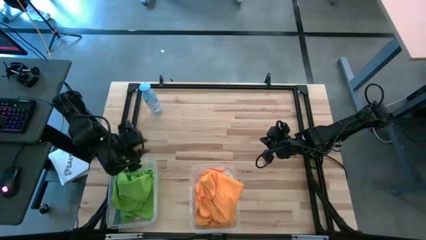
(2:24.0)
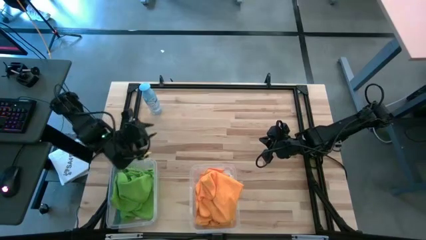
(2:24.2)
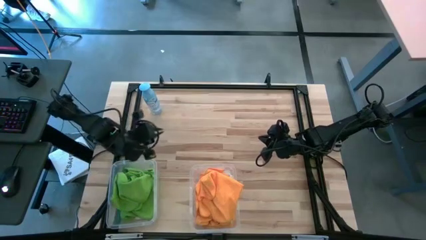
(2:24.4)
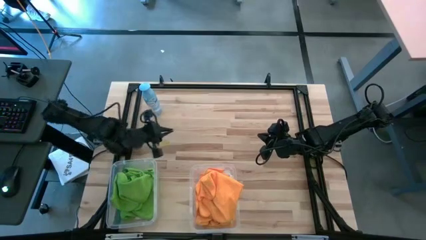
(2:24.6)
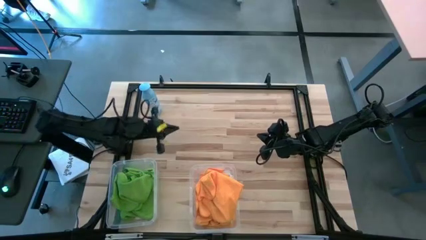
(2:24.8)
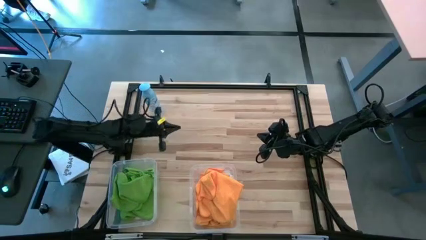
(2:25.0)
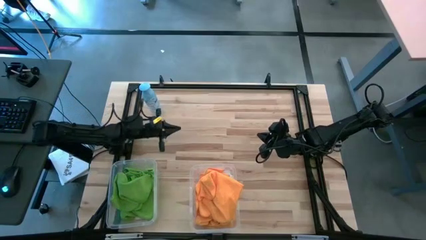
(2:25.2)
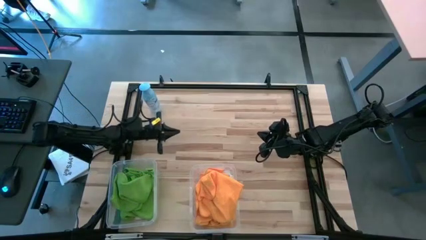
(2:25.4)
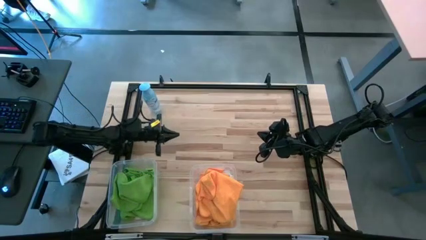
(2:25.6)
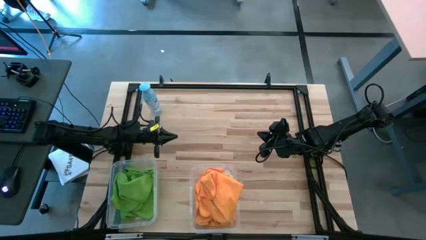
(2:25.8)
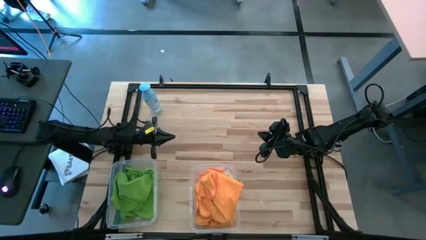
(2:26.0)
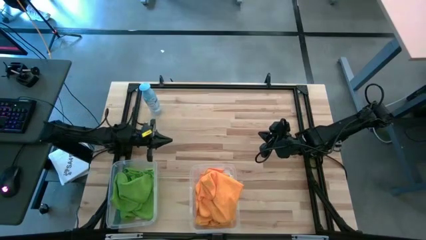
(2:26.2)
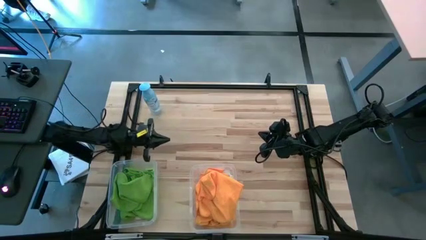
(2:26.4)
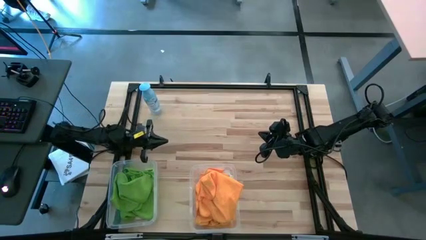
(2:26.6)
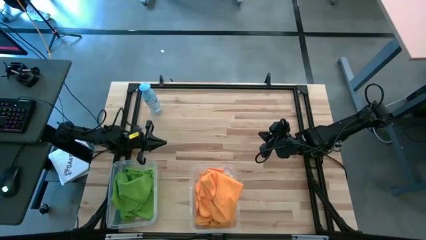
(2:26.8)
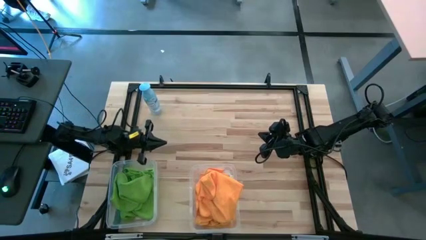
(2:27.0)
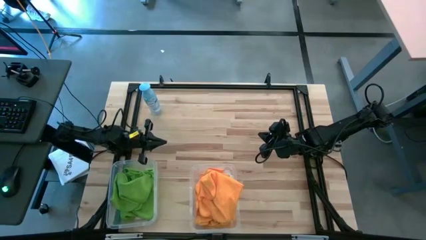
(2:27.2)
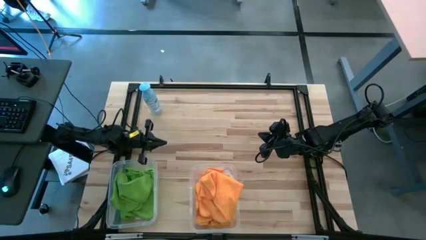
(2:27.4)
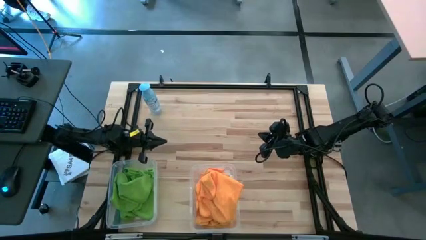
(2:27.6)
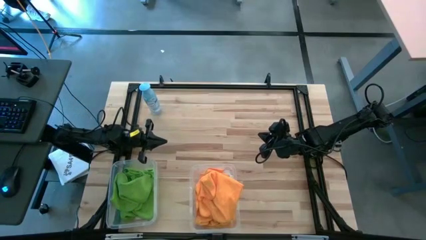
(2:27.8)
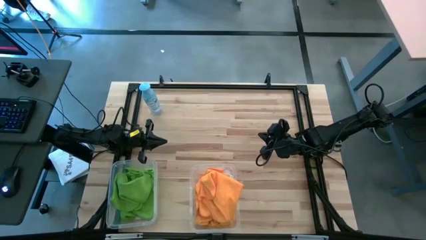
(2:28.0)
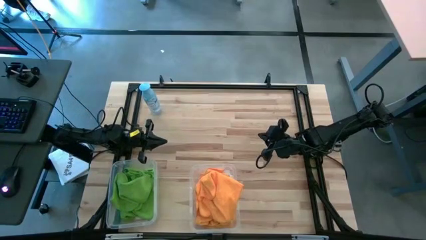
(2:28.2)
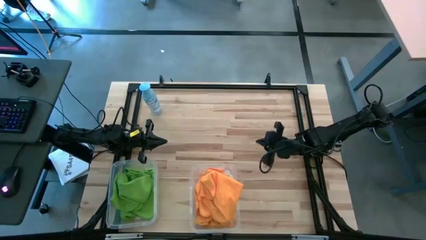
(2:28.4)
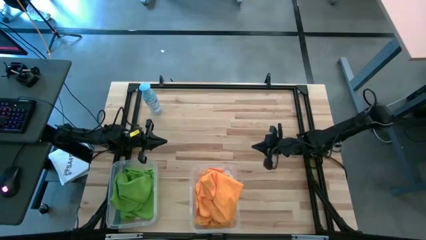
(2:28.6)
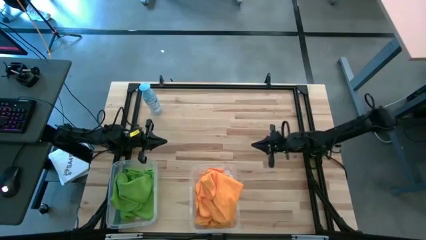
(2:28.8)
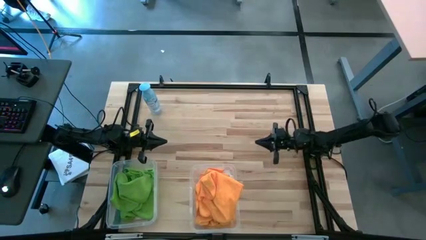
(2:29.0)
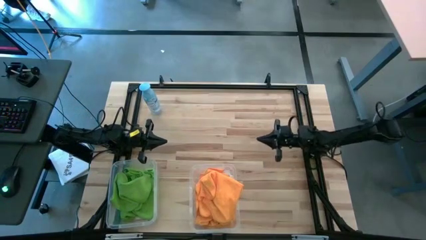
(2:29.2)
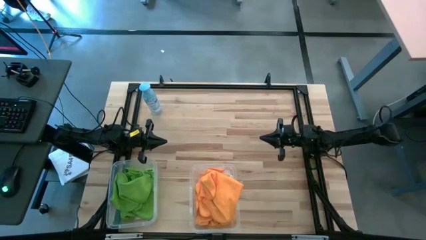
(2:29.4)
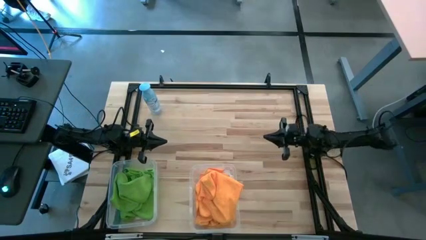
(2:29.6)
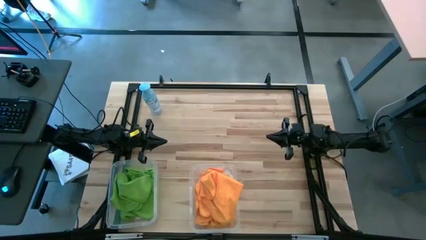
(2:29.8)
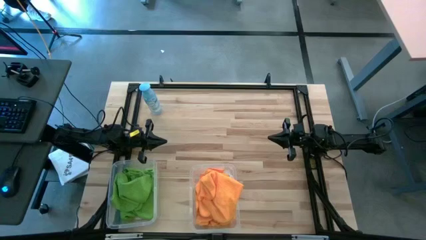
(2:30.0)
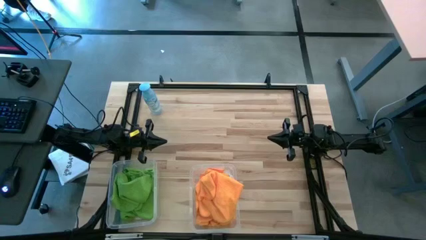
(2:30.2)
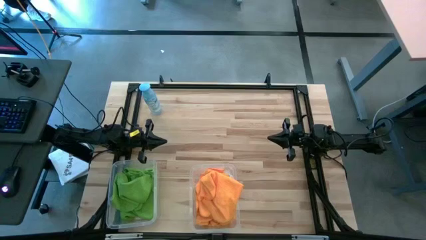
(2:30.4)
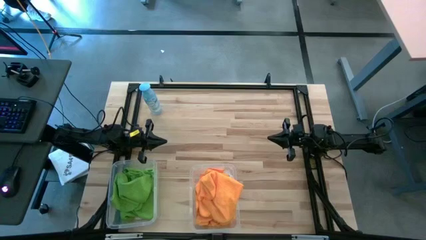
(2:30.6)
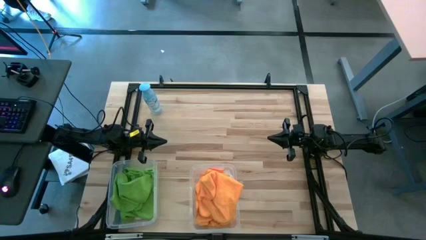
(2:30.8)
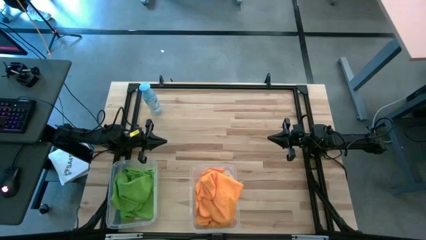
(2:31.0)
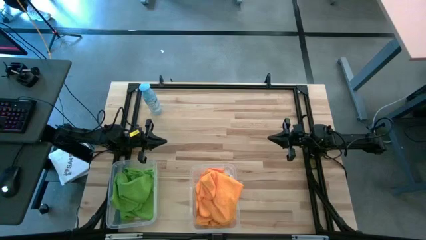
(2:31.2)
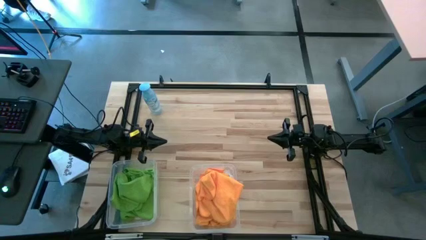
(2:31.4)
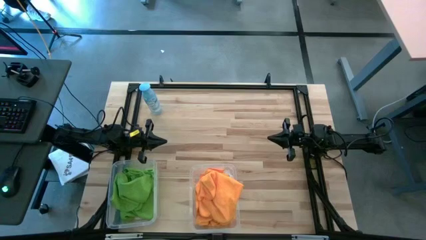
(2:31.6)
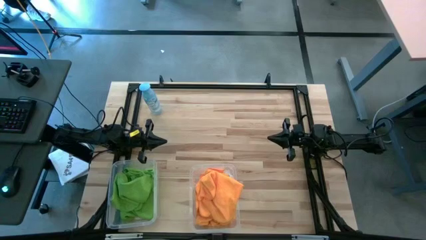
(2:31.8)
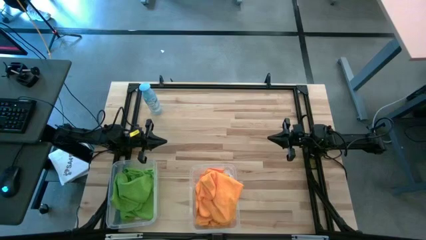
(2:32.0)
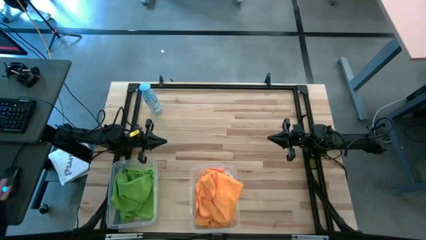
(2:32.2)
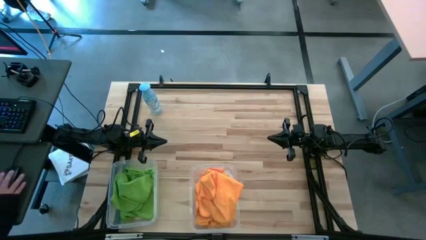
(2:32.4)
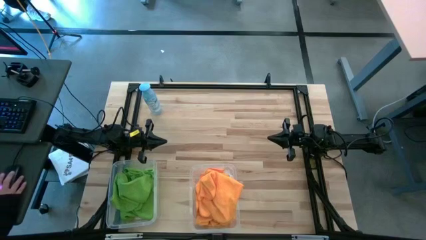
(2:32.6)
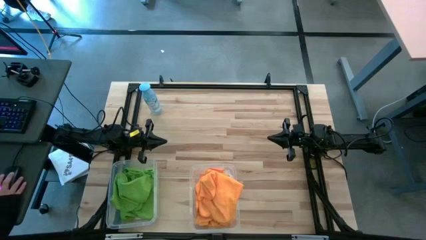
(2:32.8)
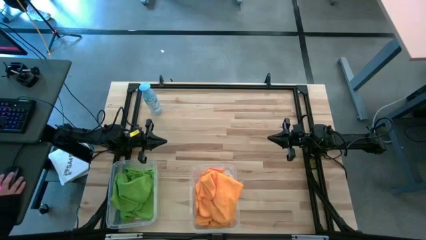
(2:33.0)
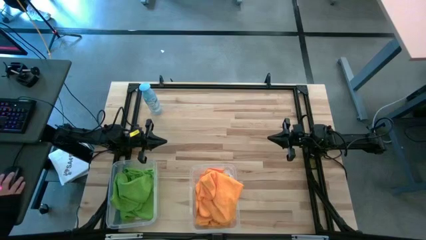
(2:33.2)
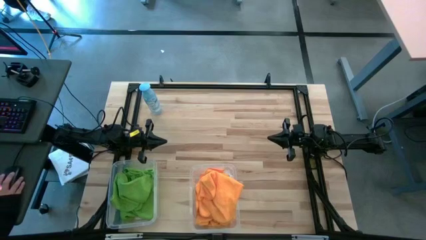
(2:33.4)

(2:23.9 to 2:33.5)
Task: Sort microfiber towel by color & place in baskets
Return to Home Position

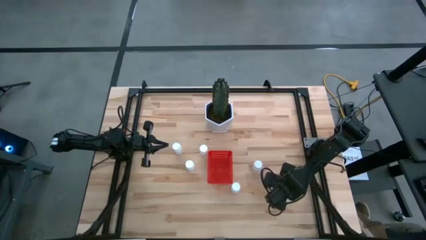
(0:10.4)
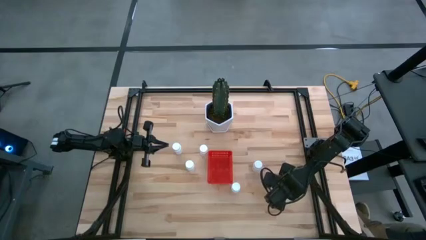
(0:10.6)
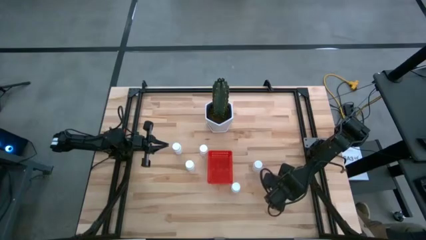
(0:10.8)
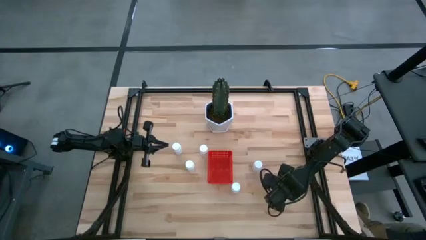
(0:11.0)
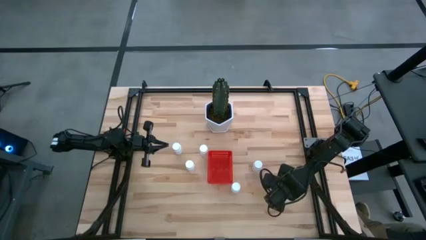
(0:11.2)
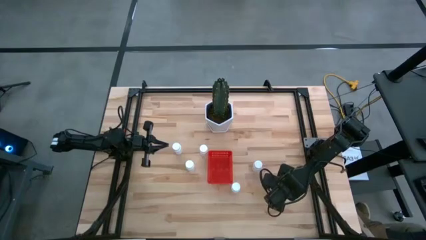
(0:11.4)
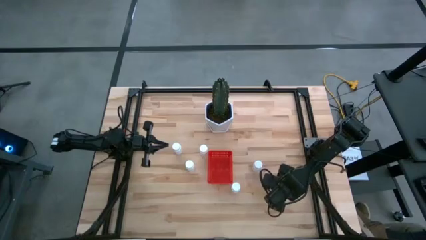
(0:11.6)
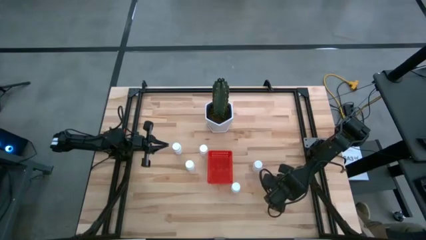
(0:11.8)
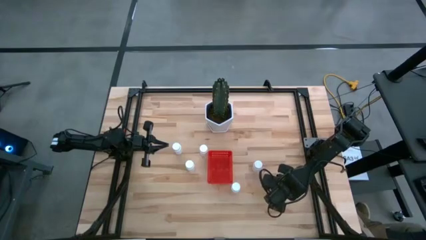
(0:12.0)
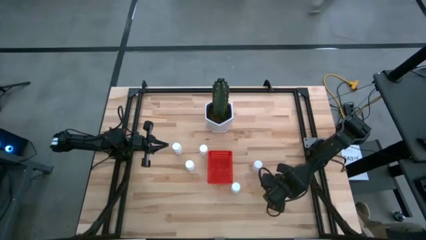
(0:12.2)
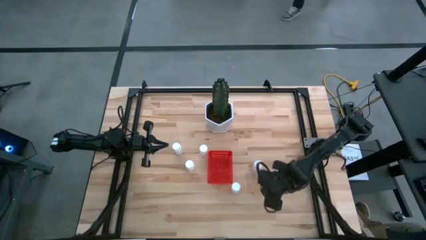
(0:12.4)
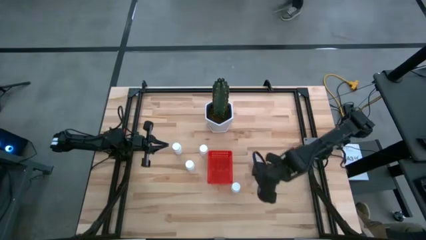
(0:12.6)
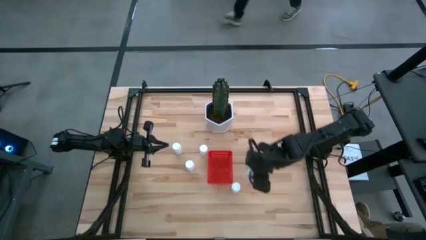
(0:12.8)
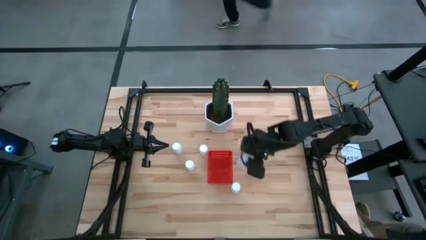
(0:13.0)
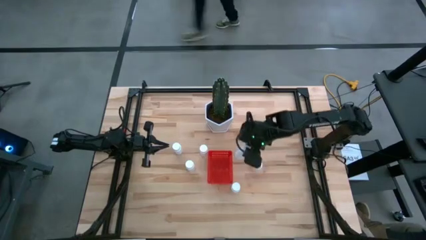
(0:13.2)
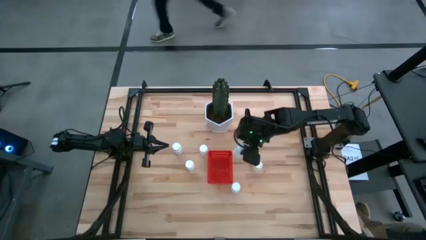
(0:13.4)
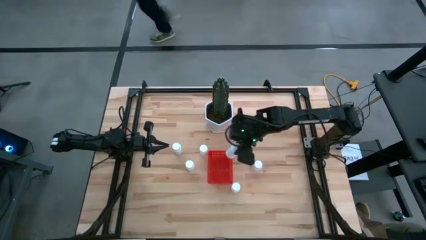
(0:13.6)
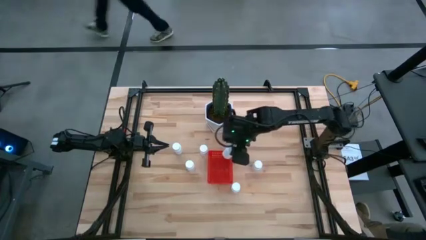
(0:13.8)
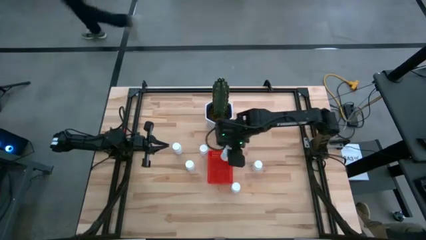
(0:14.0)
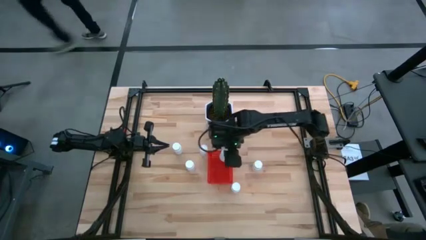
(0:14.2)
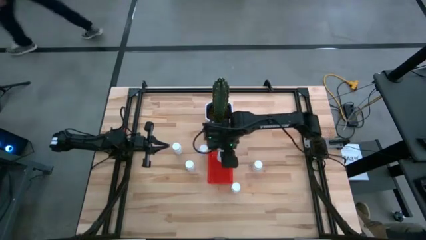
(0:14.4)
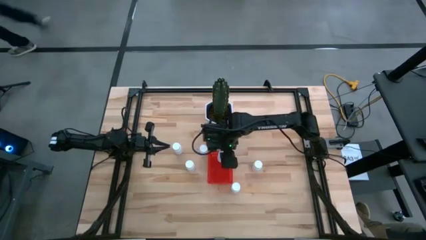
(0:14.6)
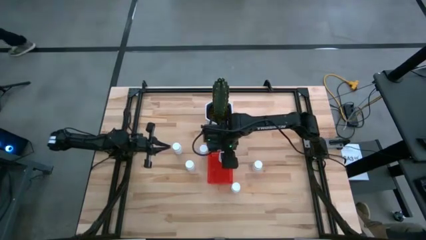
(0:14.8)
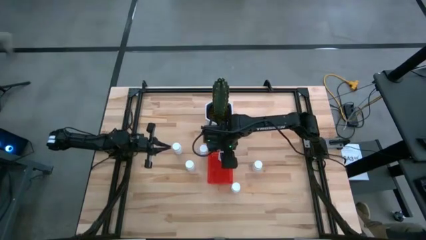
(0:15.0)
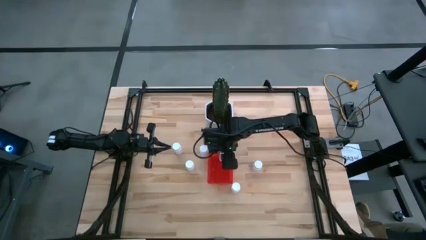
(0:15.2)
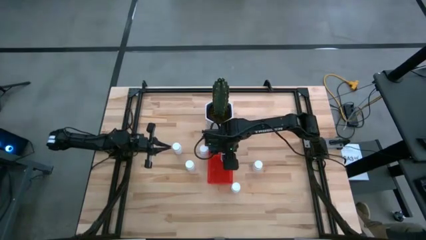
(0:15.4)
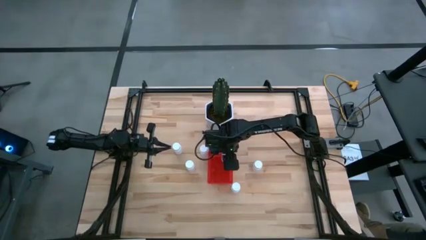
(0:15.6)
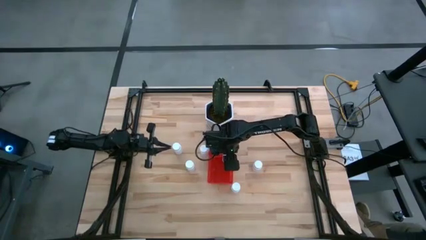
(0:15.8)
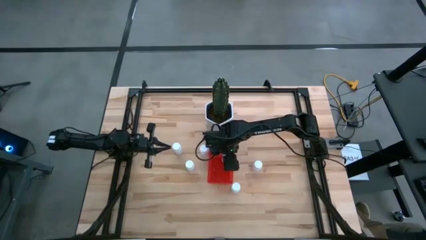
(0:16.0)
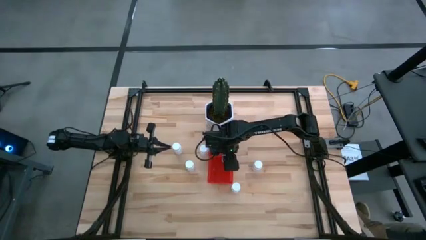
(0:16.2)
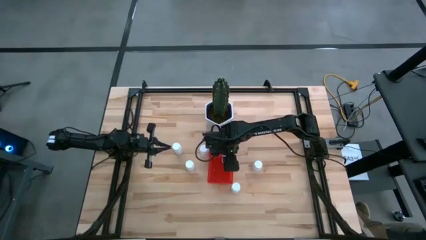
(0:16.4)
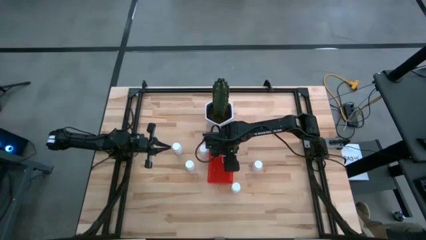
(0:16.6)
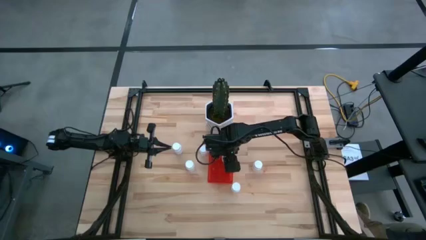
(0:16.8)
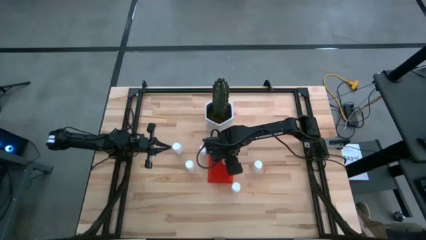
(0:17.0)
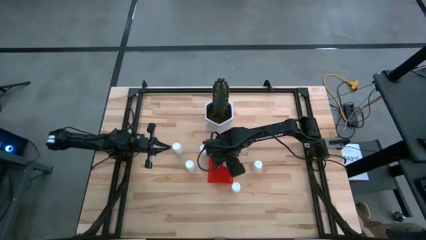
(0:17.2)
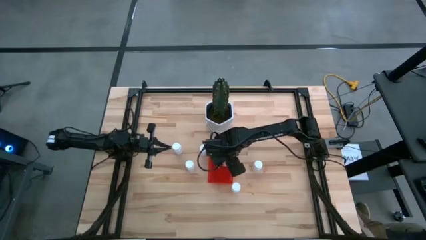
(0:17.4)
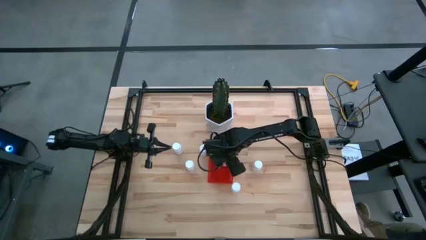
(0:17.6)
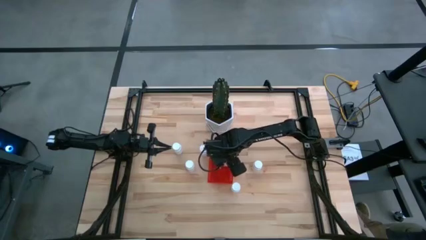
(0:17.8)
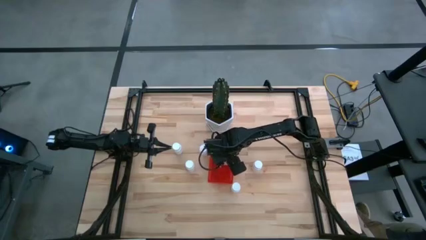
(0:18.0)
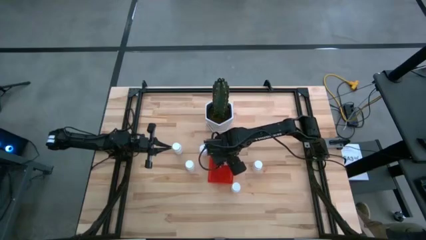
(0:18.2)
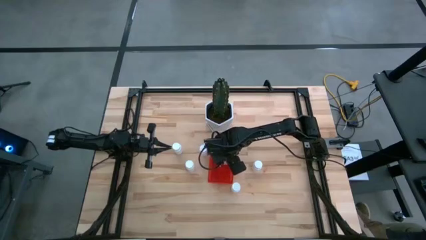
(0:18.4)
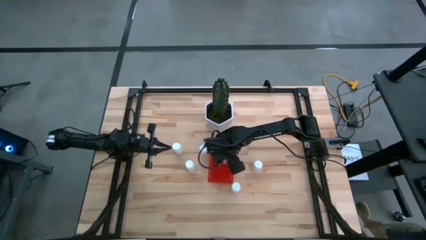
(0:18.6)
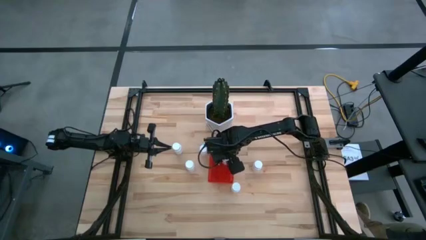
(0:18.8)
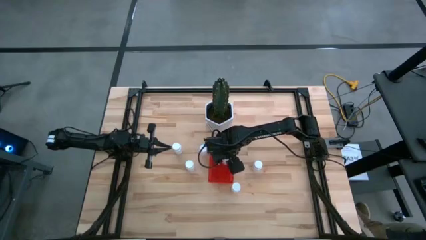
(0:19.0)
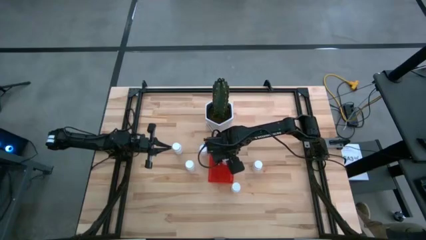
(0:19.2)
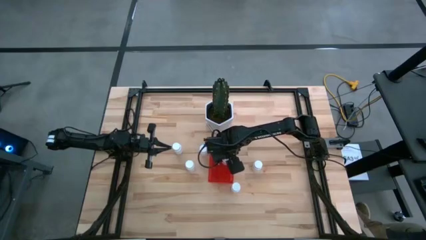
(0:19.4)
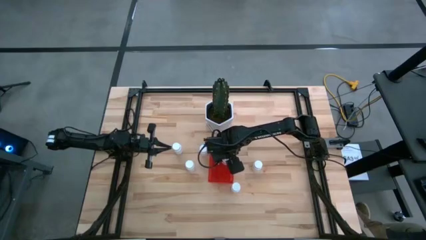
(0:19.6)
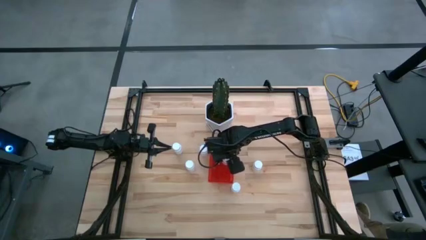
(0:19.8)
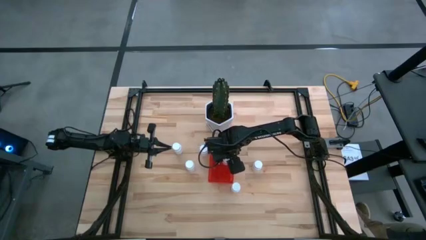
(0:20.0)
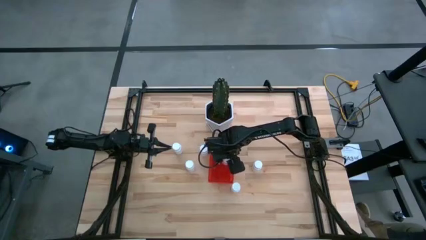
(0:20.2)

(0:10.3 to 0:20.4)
Task: Pick and place pill bottles into a basket
Put the white pill bottle into the red bin
